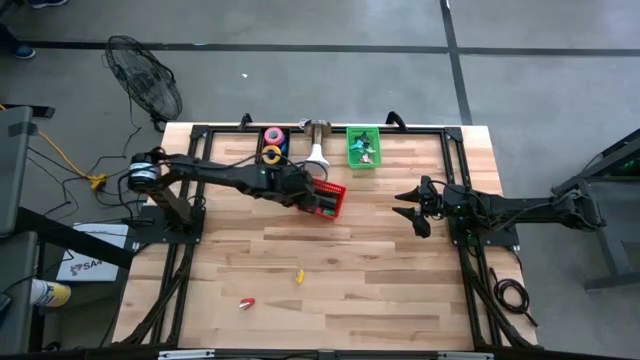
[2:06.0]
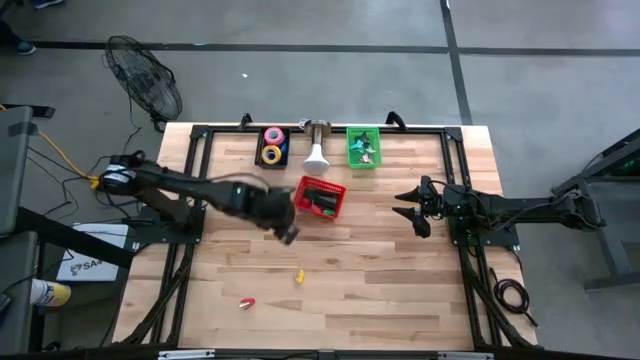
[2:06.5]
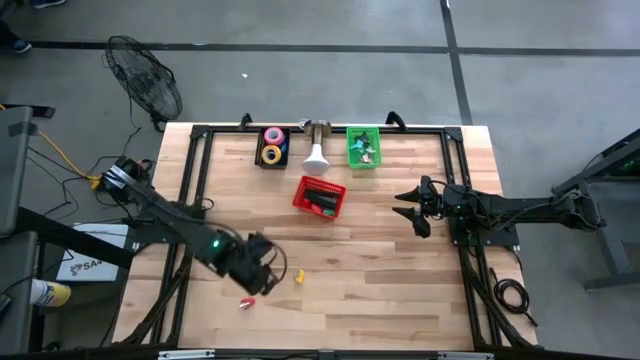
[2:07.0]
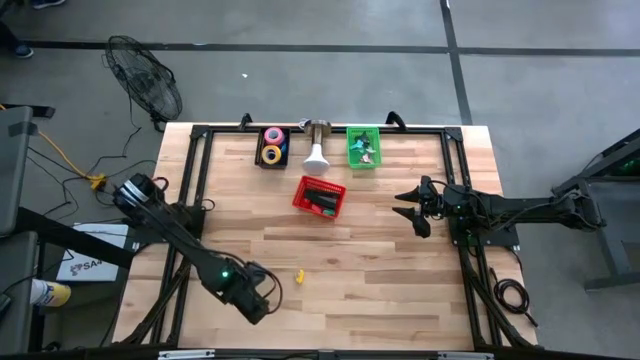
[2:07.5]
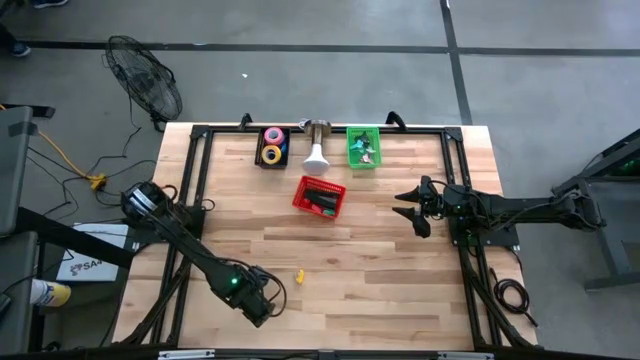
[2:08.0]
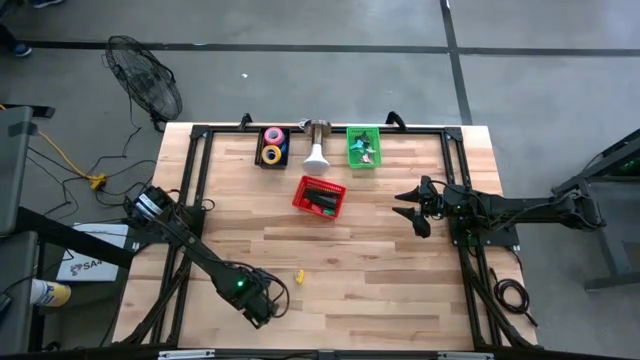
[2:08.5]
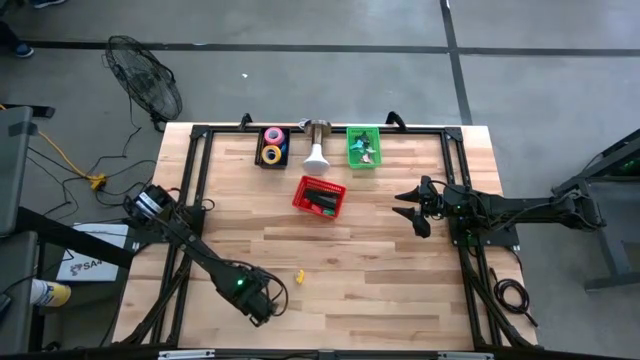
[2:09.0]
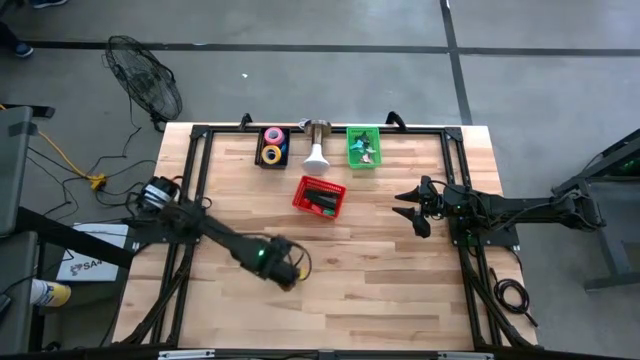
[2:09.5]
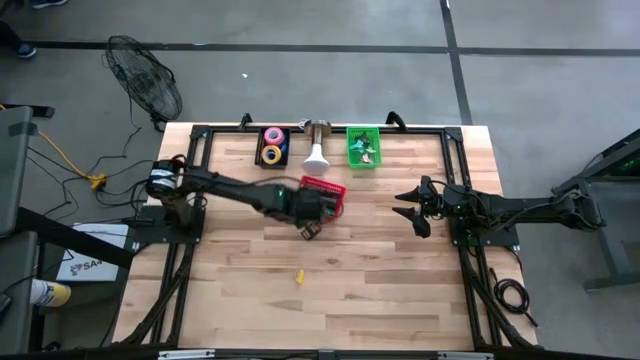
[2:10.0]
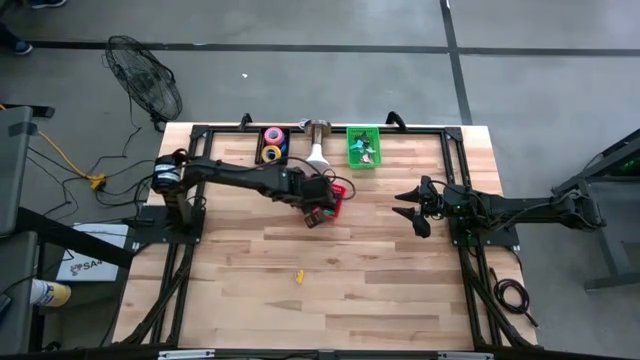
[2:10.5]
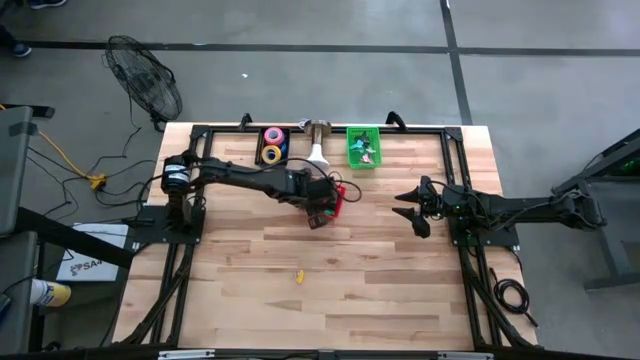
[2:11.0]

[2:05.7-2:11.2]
Task: Pick and place Stapler, Stapler remover, tape
Put the red stapler into the red basket

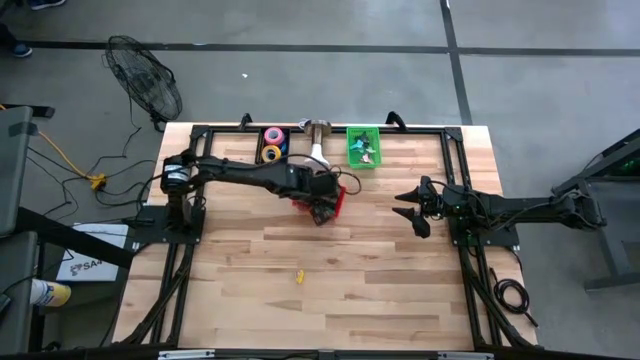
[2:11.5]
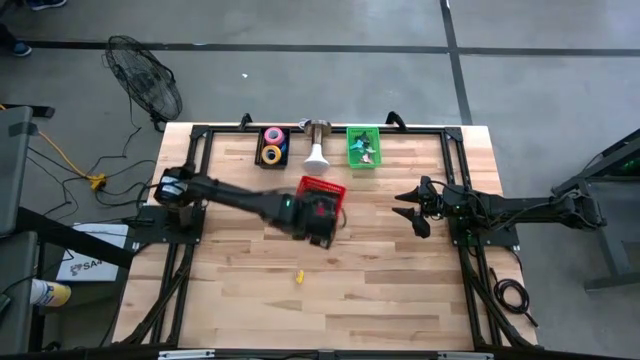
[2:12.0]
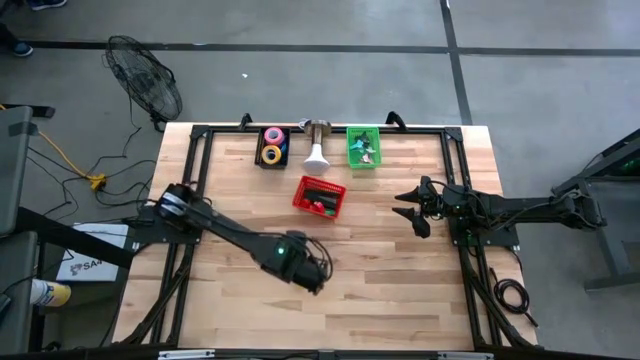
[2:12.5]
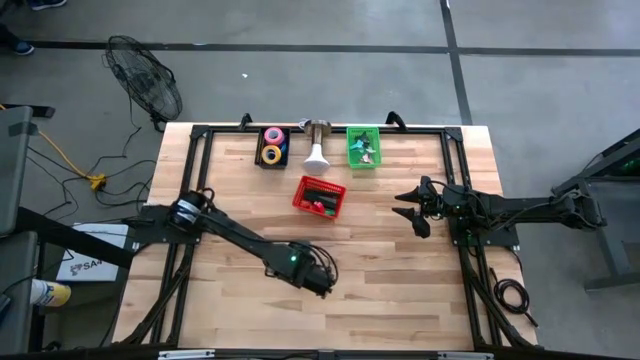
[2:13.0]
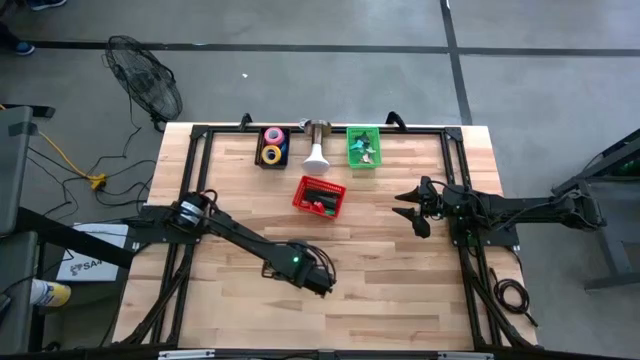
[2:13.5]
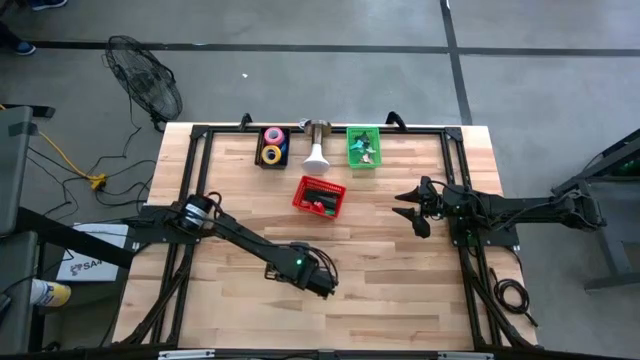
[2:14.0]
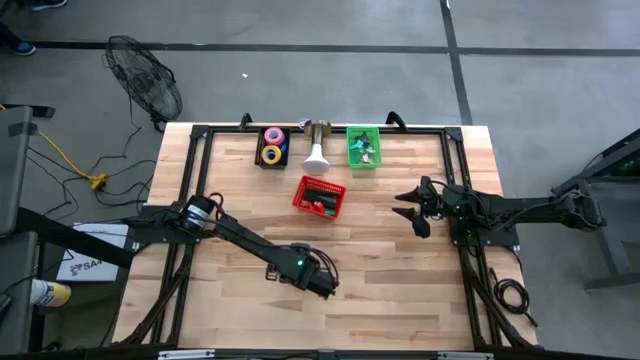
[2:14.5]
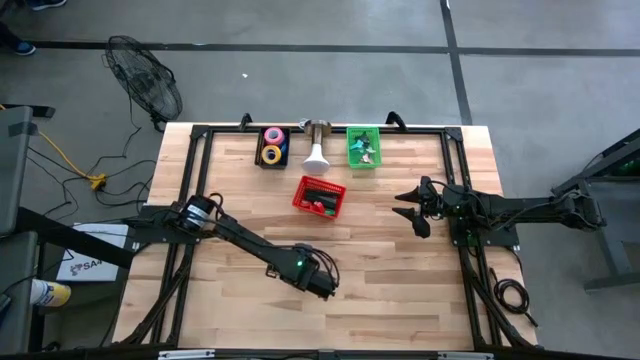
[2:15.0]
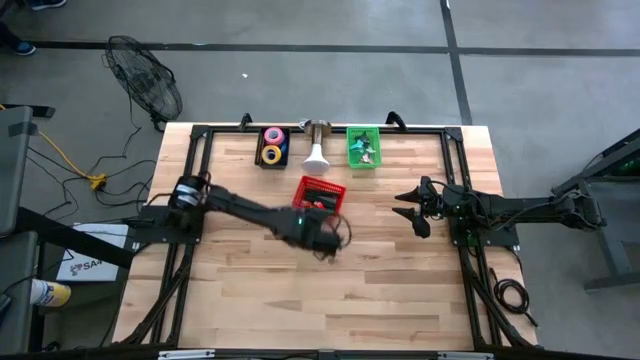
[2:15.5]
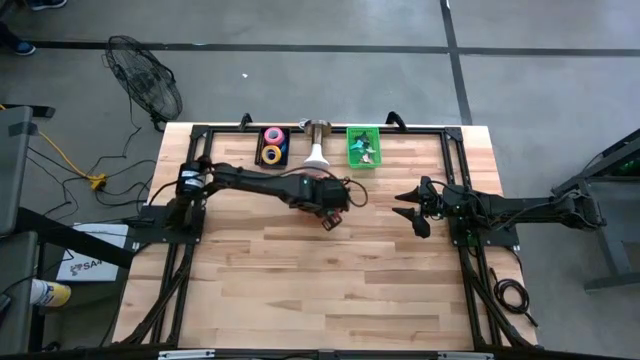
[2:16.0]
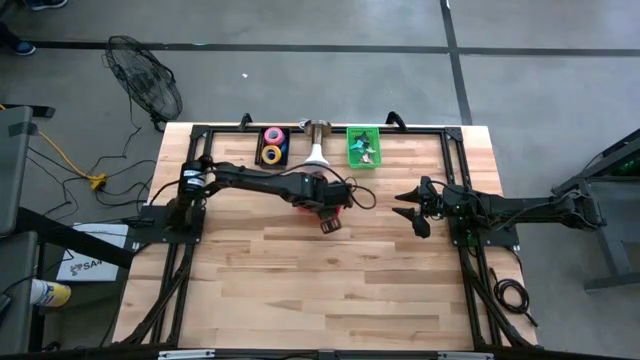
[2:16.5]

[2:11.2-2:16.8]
Put the yellow stapler into the red basket

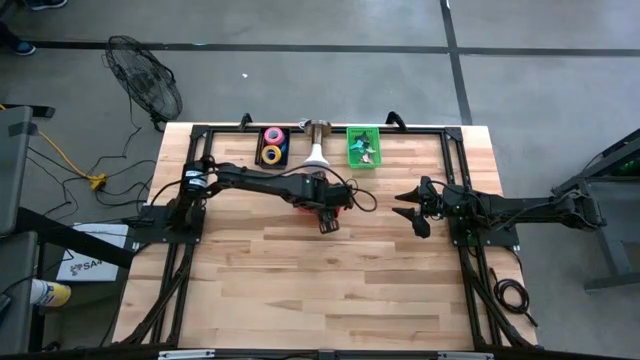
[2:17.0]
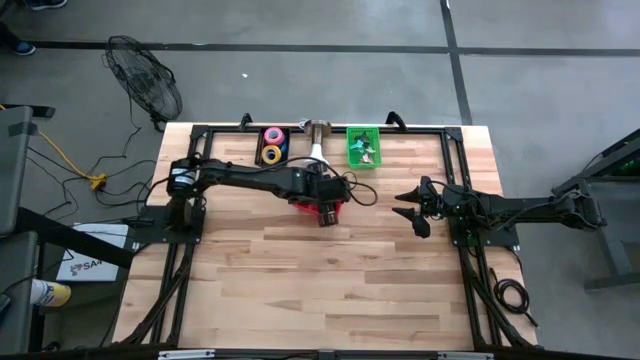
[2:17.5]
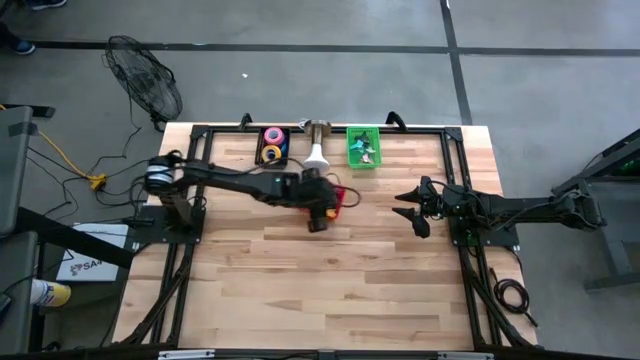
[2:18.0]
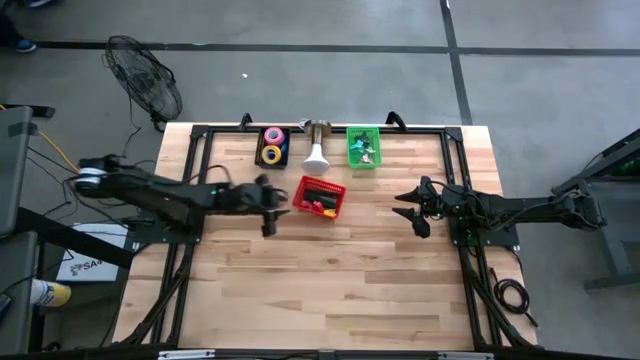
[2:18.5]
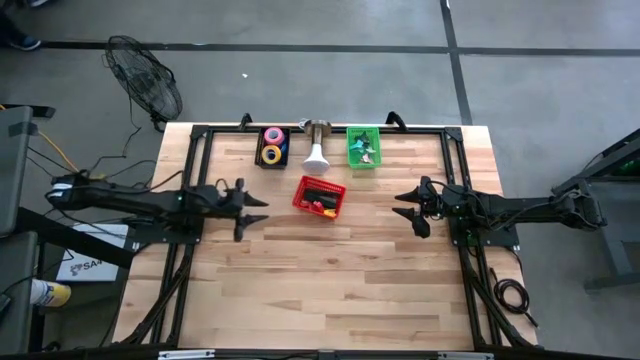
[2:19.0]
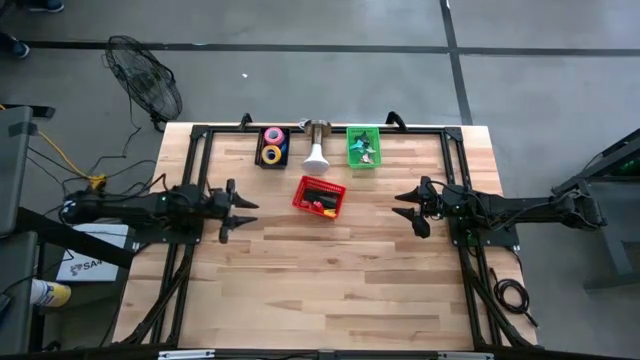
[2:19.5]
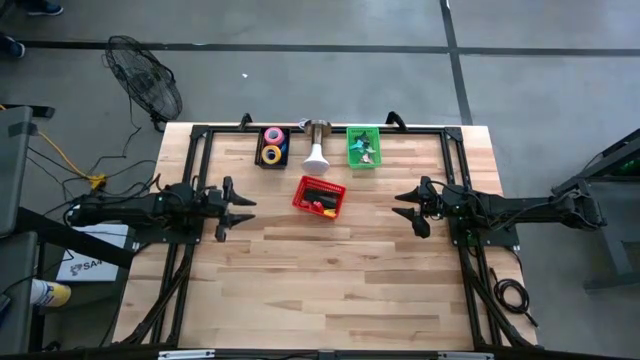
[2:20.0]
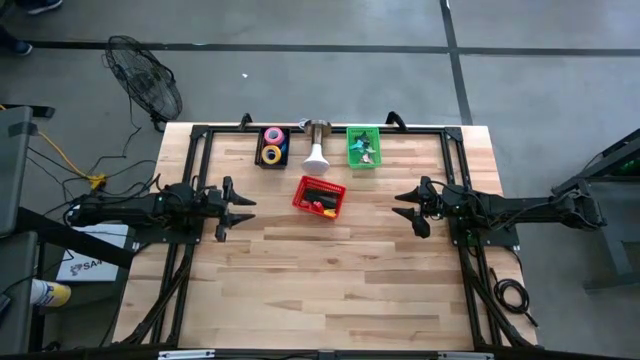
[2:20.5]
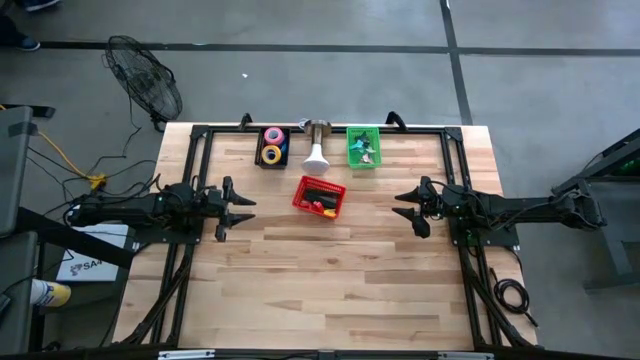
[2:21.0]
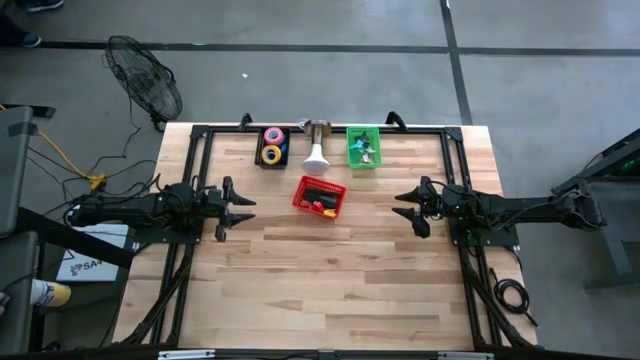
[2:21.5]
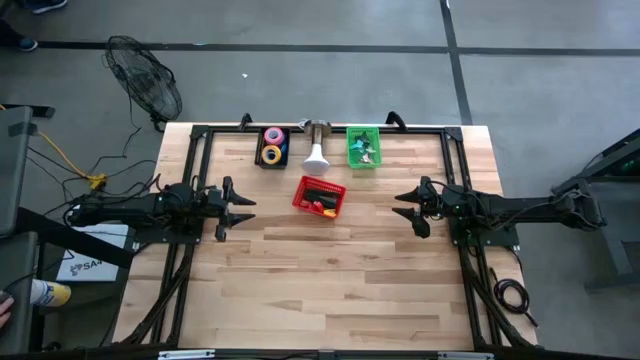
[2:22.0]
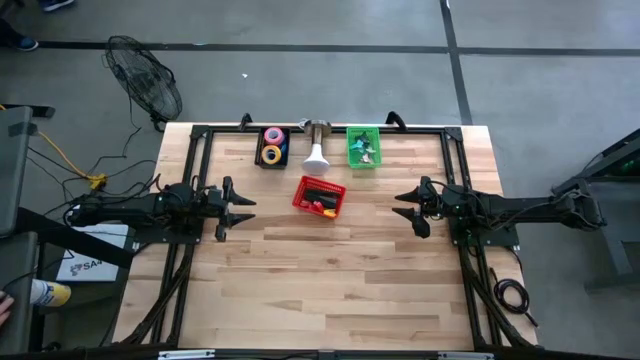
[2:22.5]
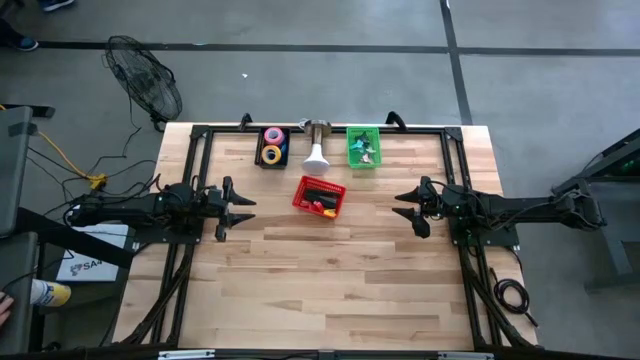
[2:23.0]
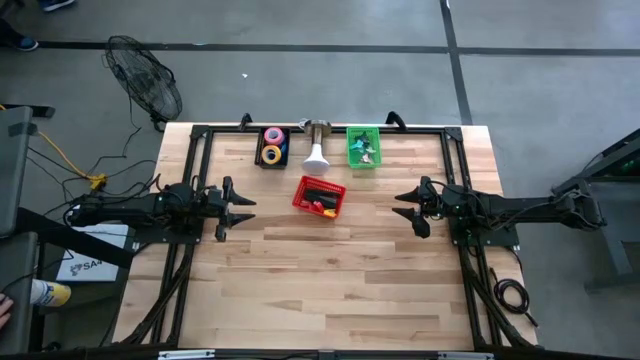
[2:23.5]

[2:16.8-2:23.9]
Return to Home Position

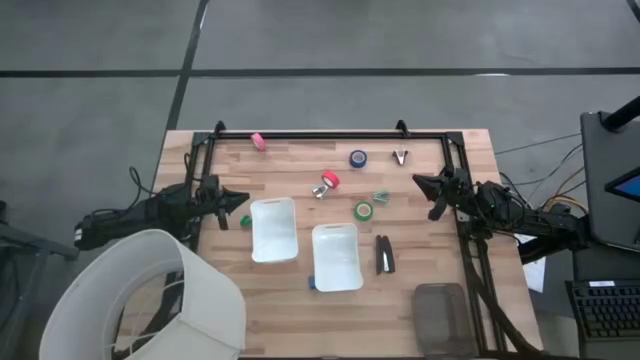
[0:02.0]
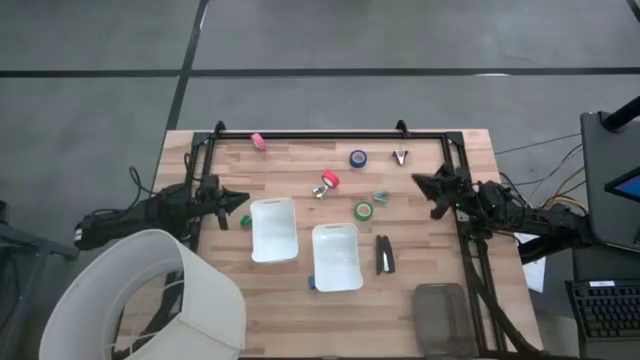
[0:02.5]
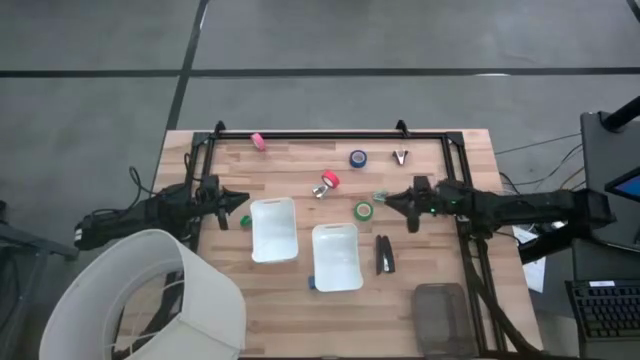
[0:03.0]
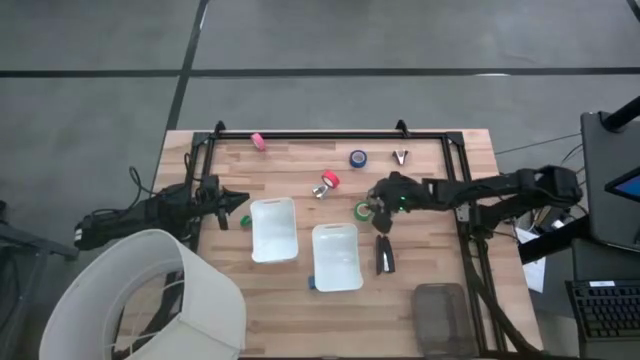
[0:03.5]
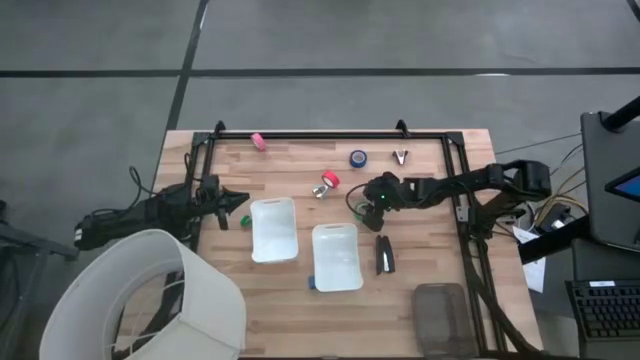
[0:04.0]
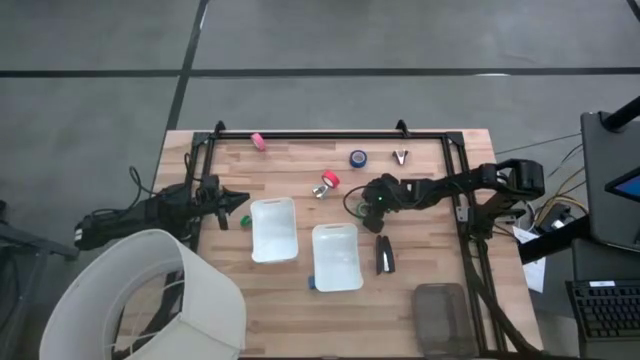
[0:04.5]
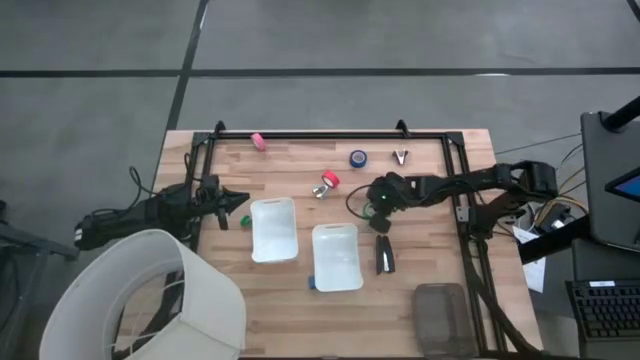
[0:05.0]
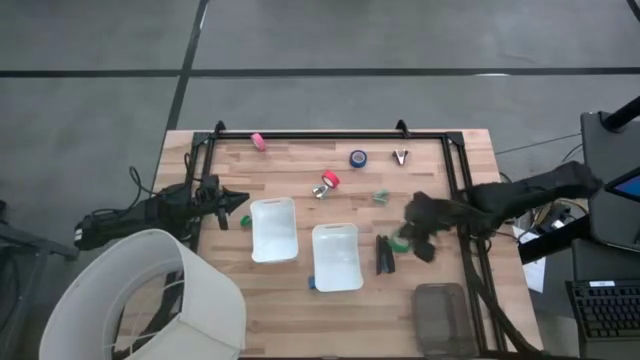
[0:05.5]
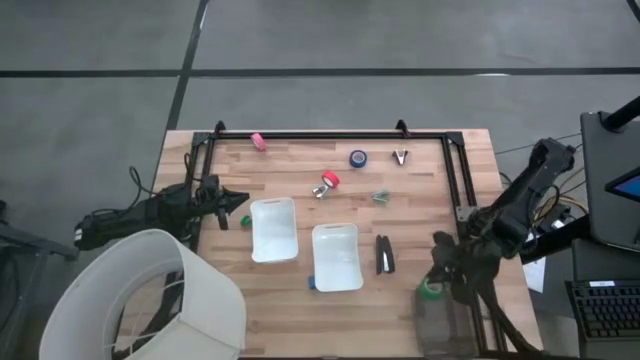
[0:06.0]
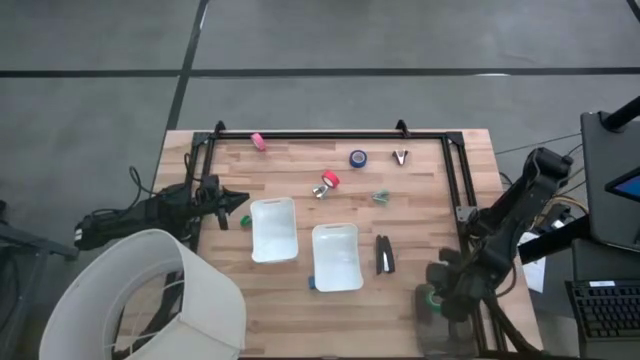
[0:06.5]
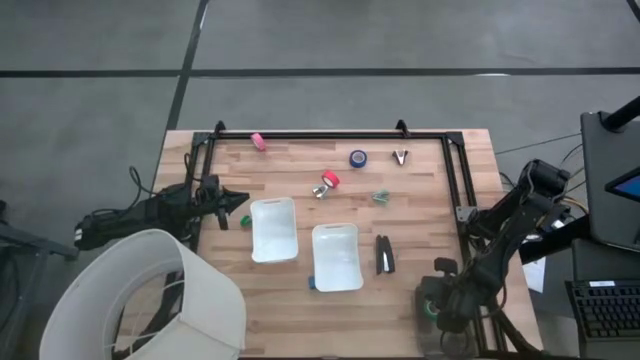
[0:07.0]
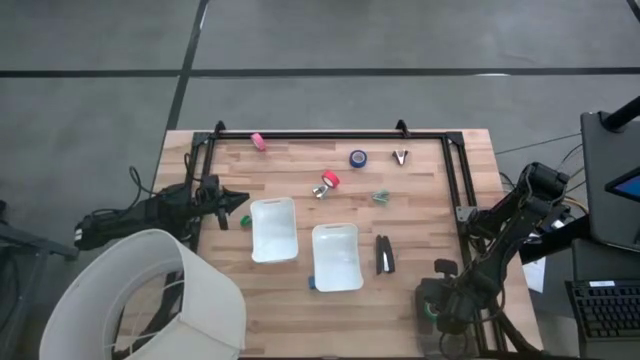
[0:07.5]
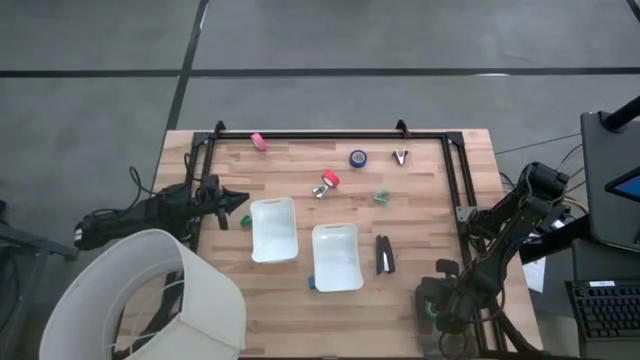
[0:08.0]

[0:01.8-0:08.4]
Task: Pick and place Stapler, Stapler remover, tape
Put the green tape into the black bin
